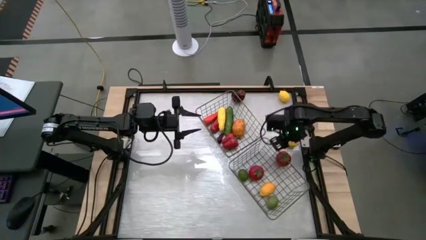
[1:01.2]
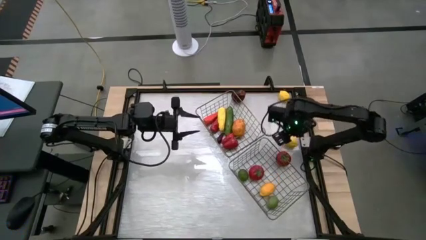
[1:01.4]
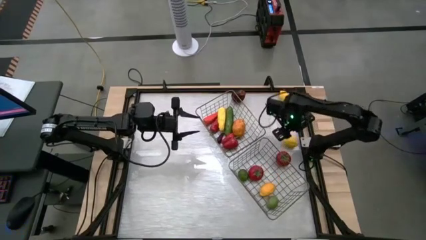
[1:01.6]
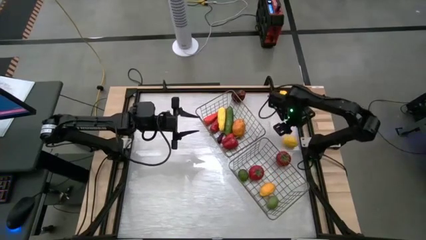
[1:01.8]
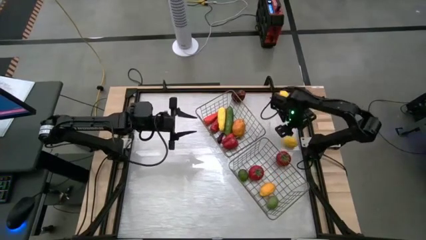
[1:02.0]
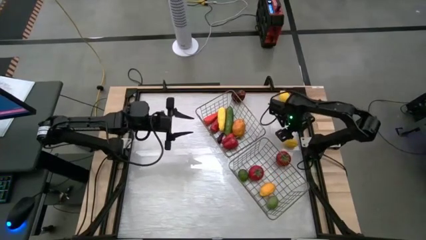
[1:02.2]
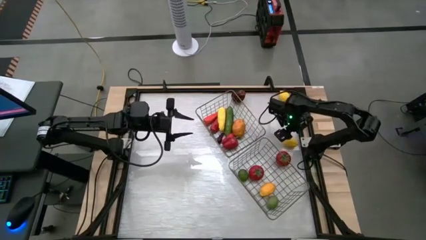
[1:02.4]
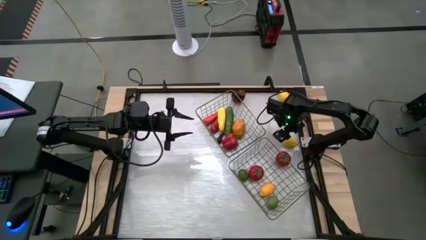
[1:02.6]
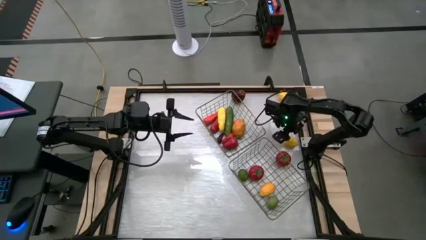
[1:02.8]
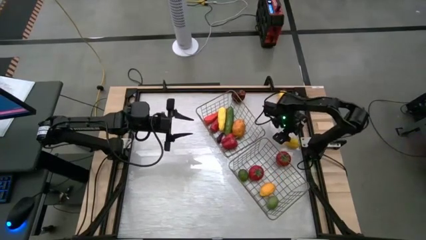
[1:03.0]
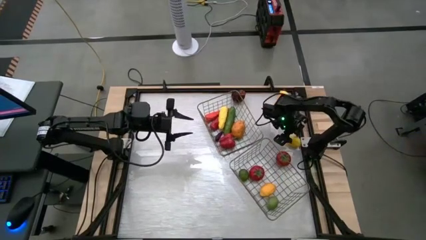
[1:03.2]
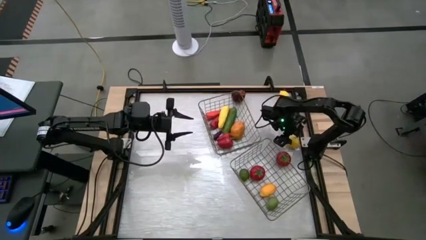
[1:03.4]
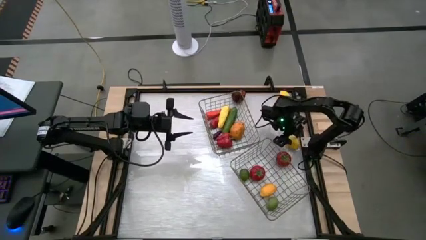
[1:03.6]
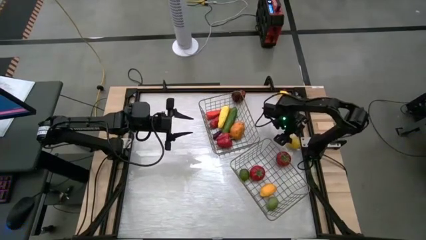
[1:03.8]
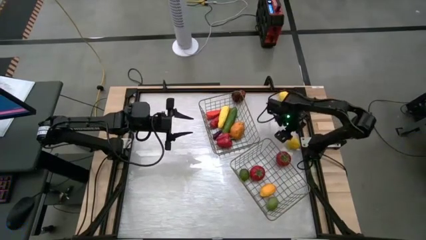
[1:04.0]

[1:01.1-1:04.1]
Task: Sort produce into baskets
Put the lemon into the right wire basket

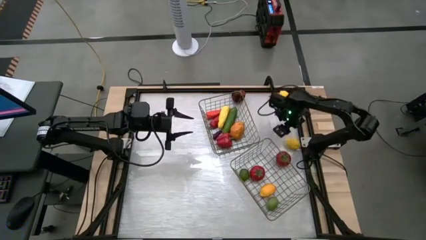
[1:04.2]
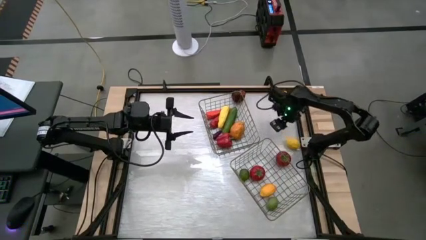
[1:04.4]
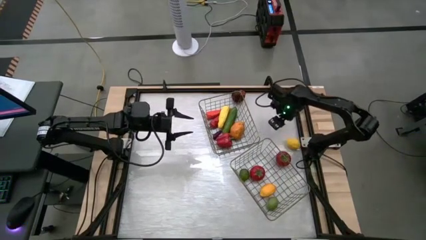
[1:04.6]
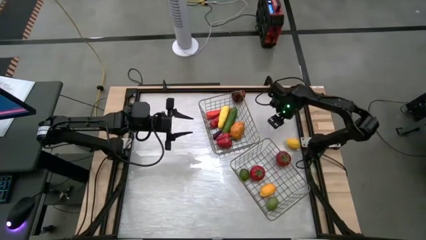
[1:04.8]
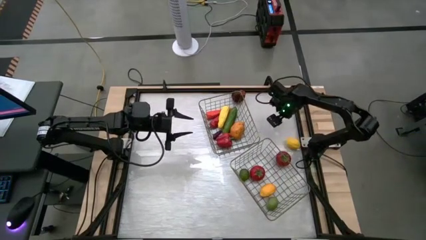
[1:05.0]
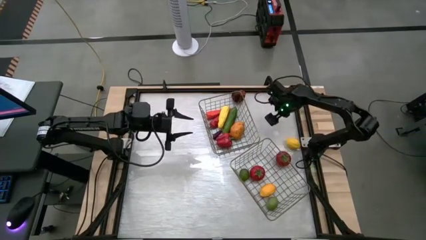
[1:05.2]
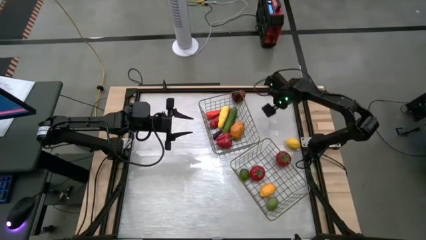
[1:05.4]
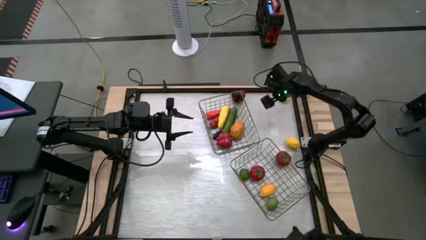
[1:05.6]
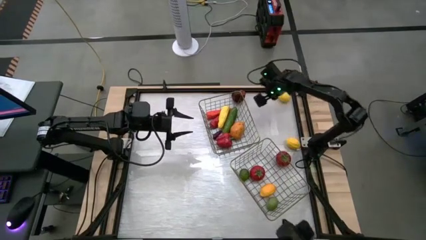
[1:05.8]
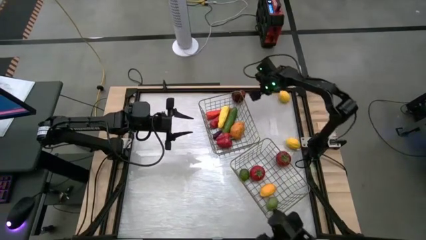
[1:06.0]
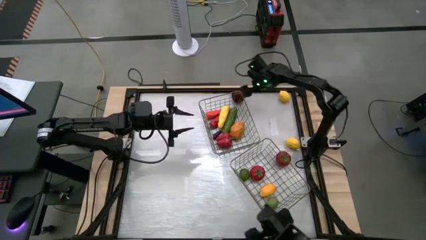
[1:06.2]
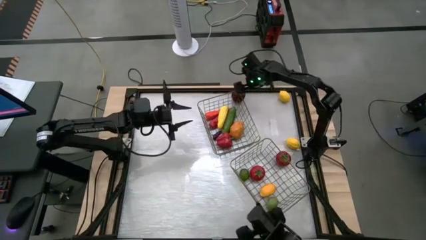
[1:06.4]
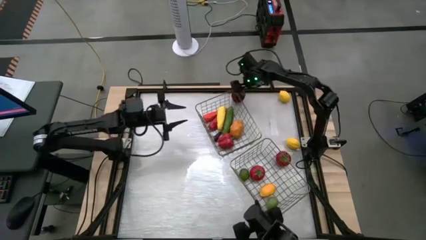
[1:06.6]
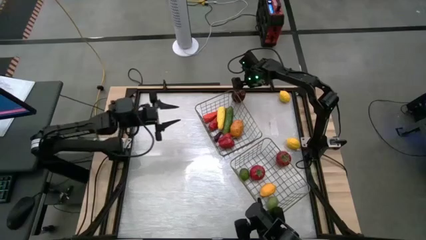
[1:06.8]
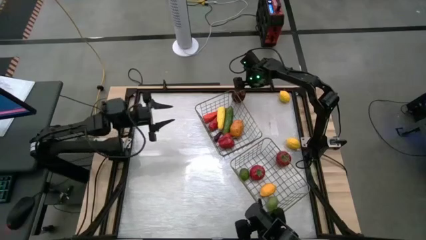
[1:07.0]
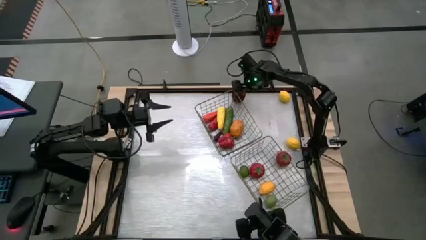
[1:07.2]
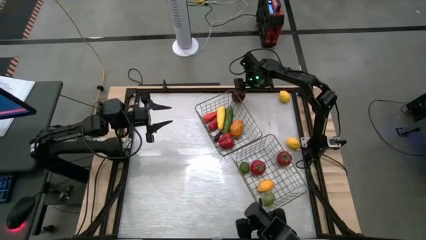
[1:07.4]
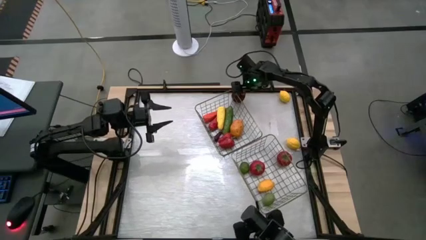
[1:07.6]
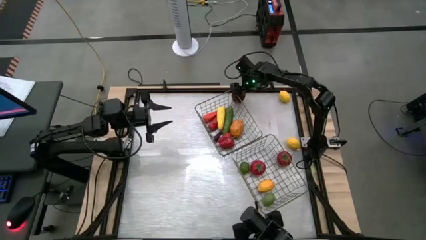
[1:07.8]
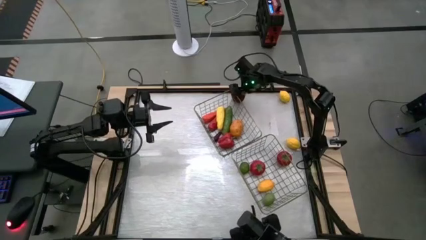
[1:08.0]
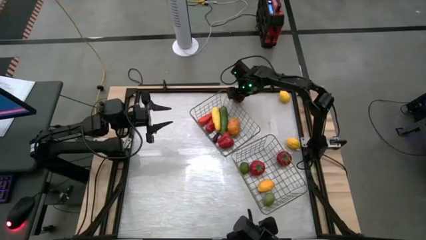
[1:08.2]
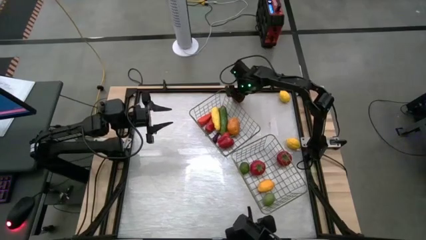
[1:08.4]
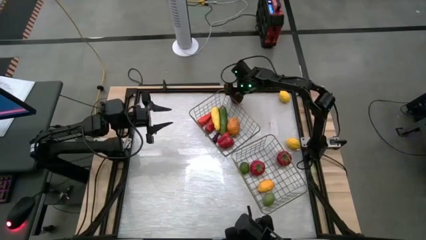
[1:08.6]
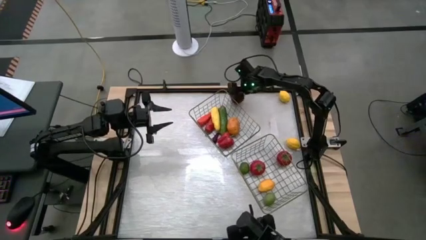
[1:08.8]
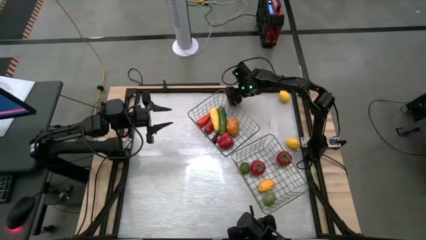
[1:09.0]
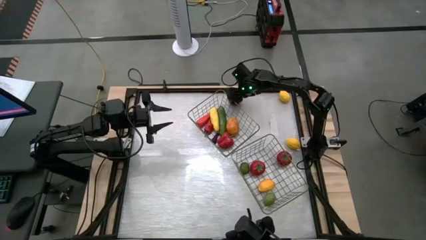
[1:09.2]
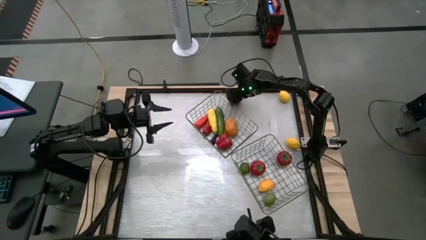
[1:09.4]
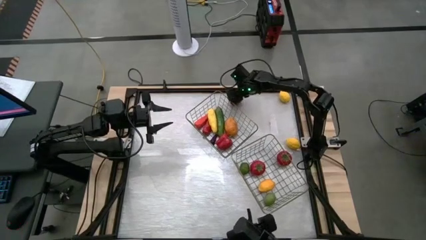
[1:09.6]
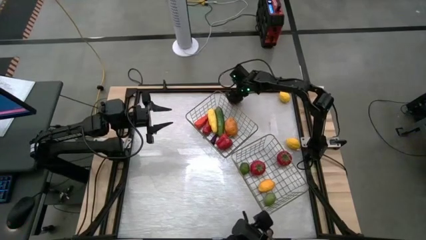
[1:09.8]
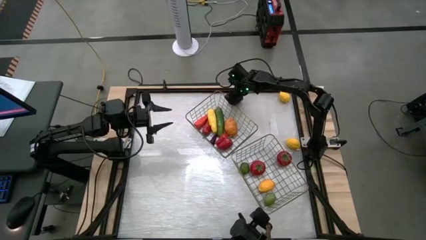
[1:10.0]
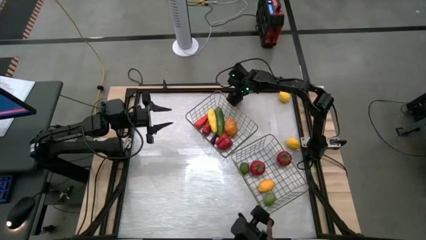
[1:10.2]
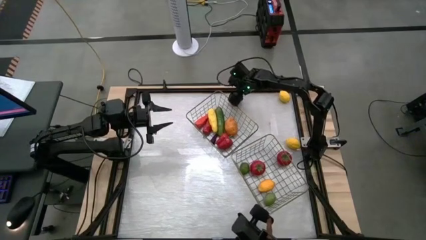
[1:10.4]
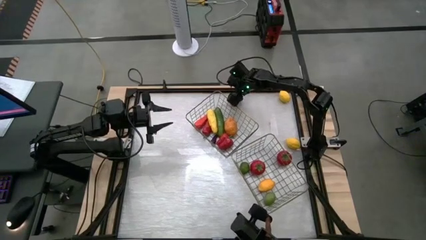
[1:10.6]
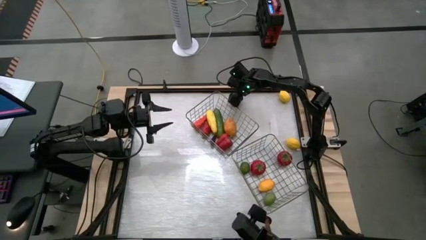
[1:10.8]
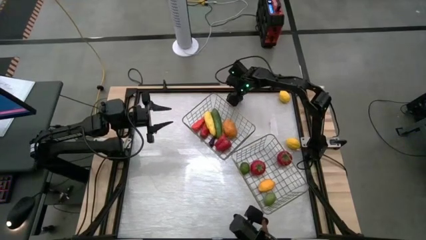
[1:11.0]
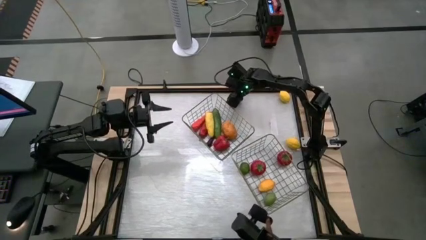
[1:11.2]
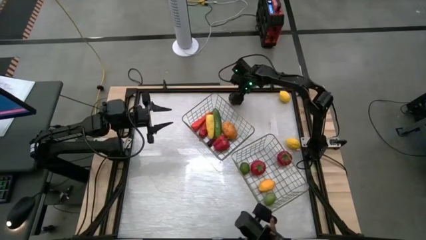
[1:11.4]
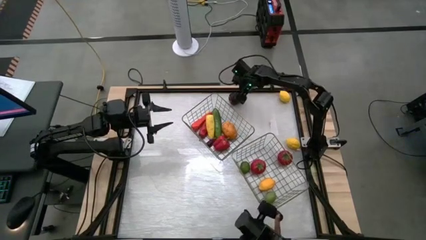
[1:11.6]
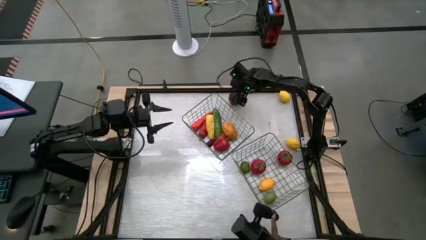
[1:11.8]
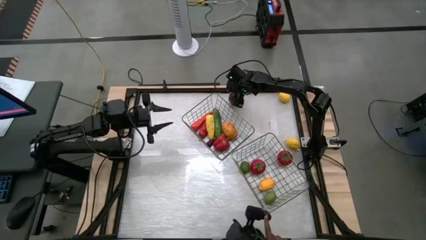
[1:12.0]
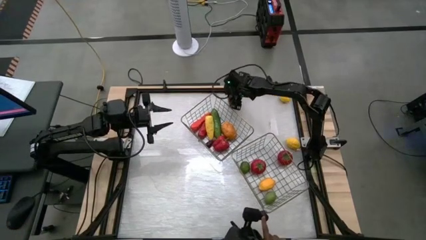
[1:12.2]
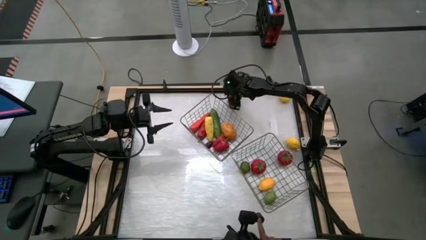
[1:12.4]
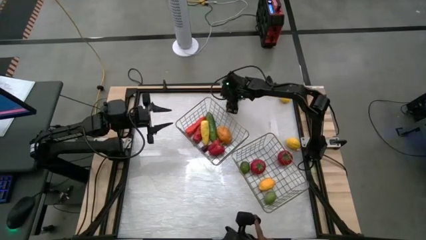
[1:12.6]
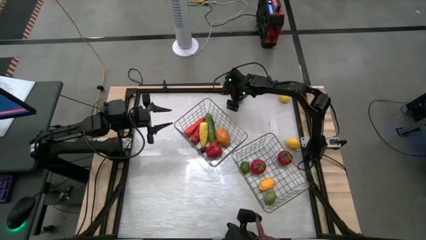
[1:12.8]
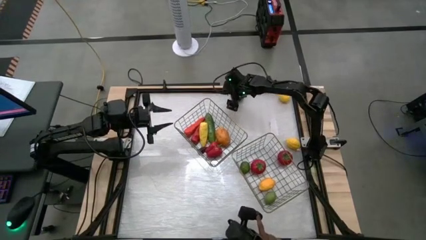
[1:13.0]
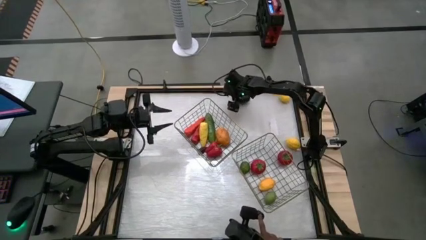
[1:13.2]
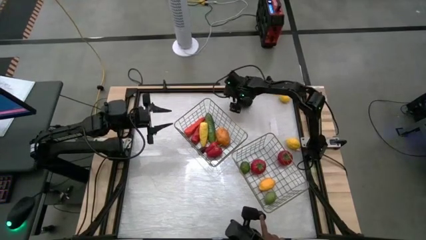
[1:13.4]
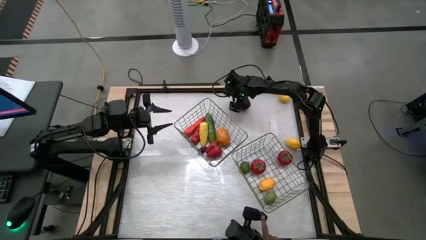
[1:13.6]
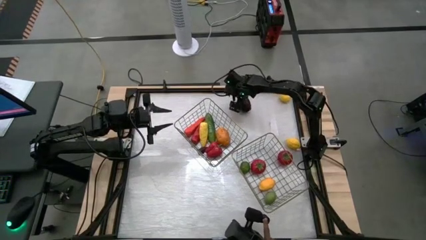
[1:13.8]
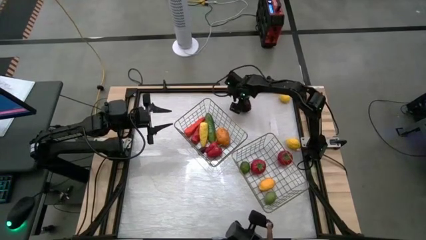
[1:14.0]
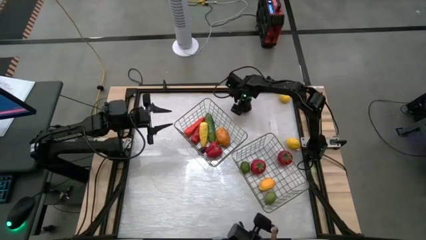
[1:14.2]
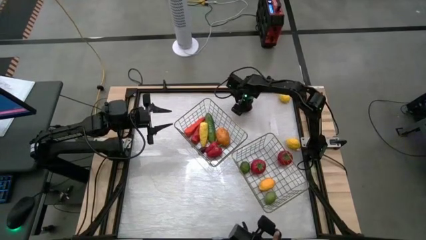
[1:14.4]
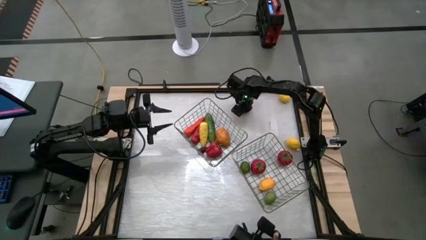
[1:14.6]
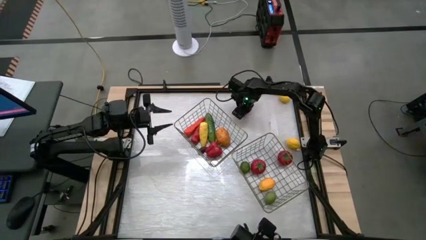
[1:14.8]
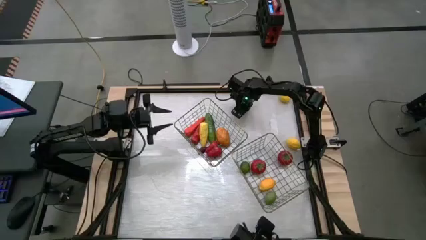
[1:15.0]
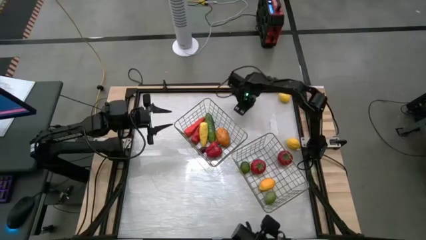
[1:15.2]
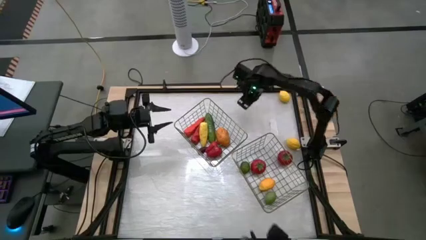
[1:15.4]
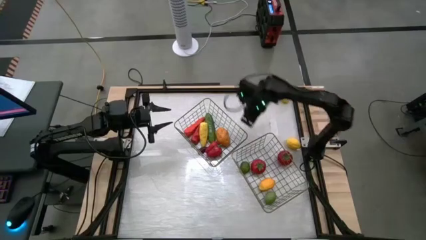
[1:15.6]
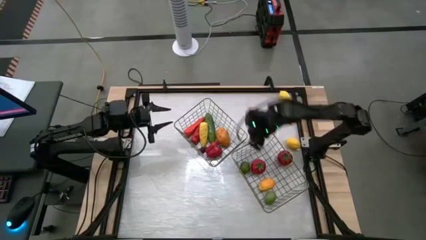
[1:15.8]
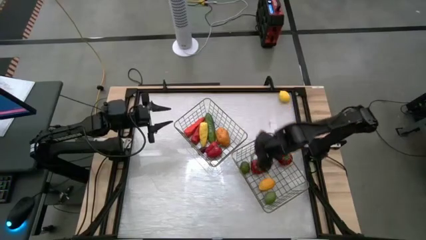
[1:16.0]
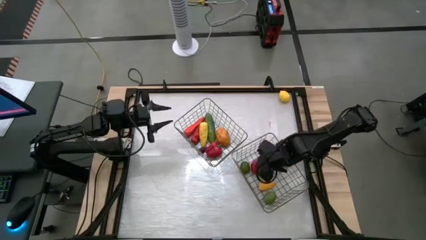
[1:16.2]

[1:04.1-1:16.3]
Put the apple into the right wire basket

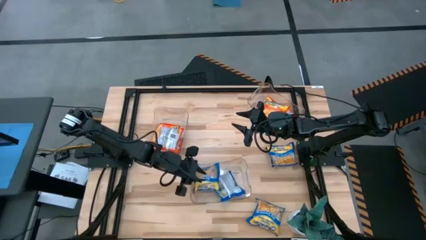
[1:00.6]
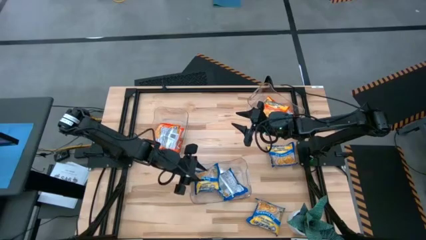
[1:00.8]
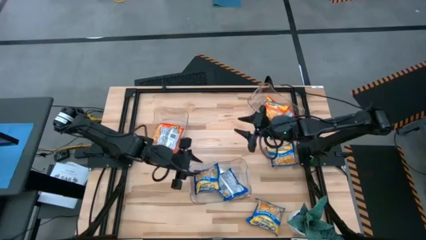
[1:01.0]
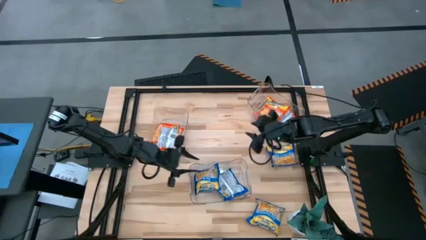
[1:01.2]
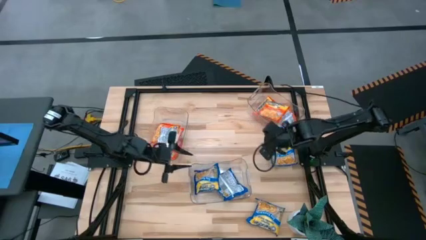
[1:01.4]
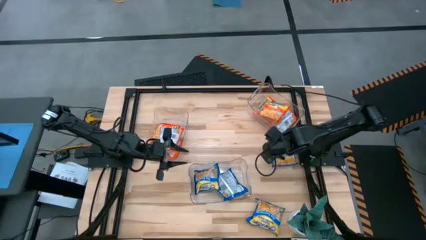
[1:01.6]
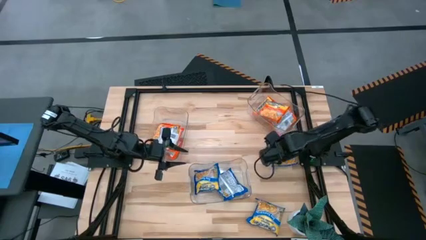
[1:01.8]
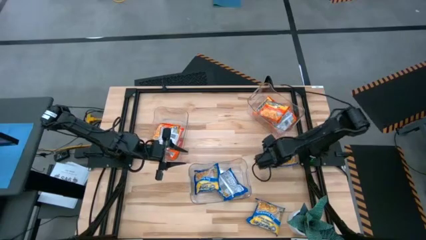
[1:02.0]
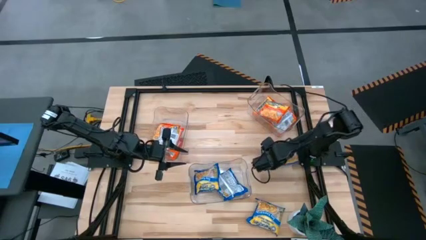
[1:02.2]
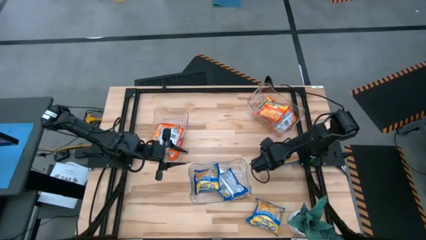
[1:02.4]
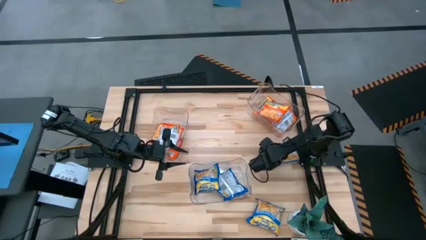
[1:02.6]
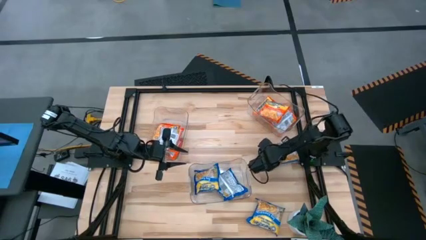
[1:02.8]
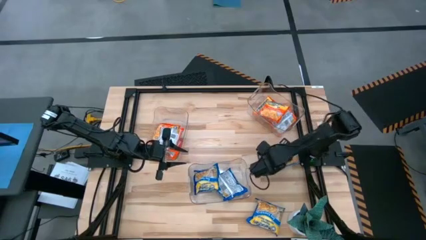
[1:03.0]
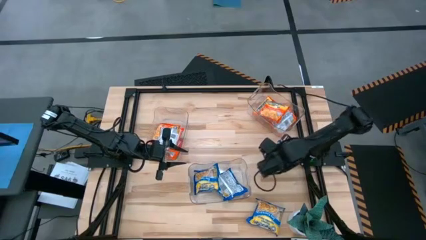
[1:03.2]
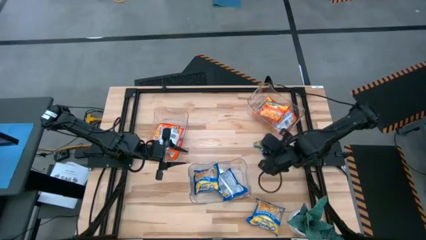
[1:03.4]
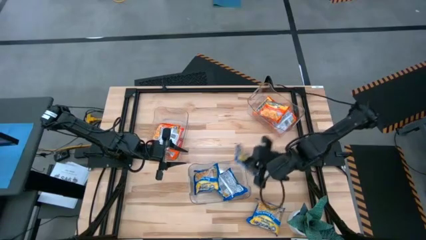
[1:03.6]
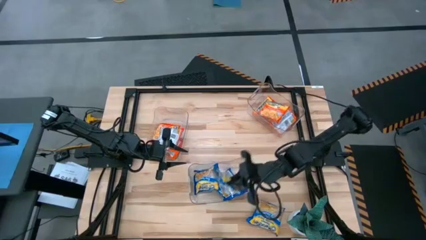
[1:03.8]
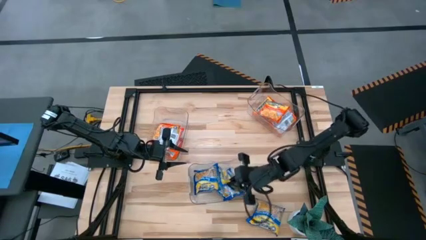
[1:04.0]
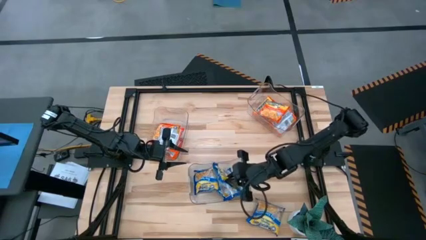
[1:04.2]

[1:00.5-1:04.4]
Task: Sort Maruchan noodles
Put the blue noodle pack into the bottom transparent bin
